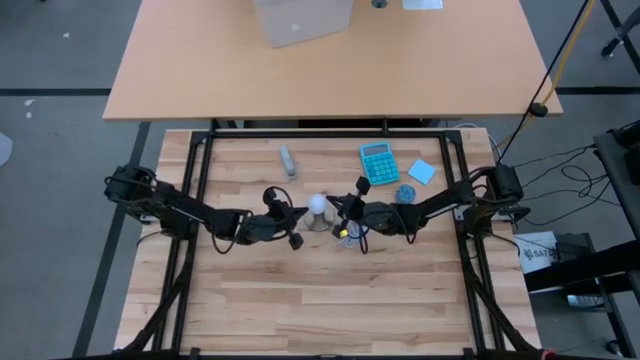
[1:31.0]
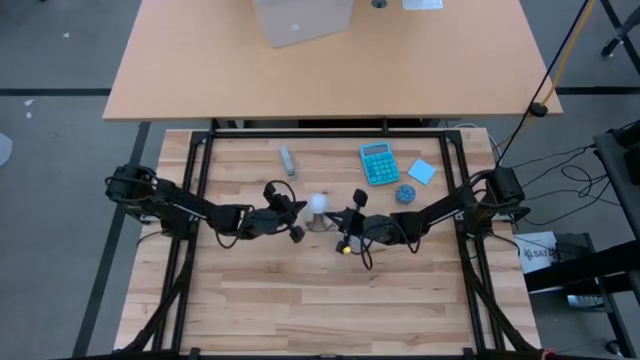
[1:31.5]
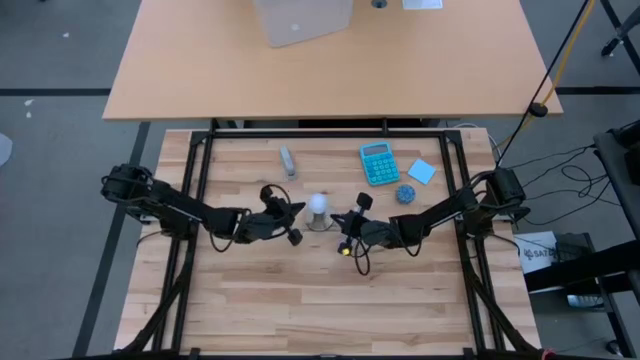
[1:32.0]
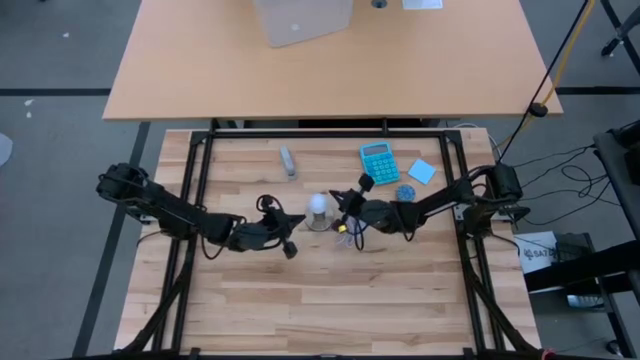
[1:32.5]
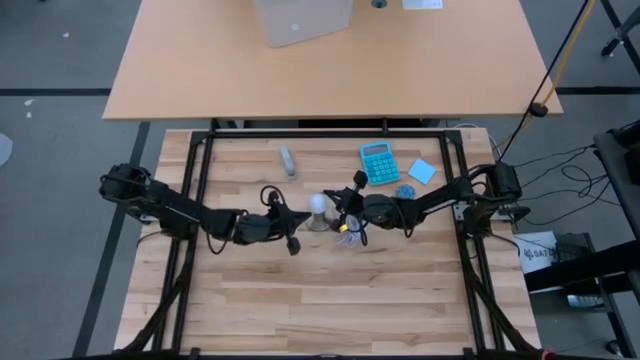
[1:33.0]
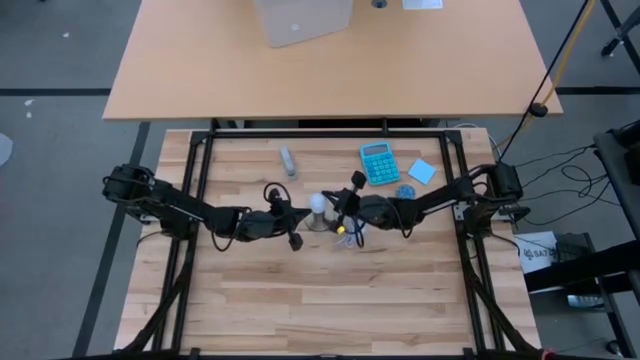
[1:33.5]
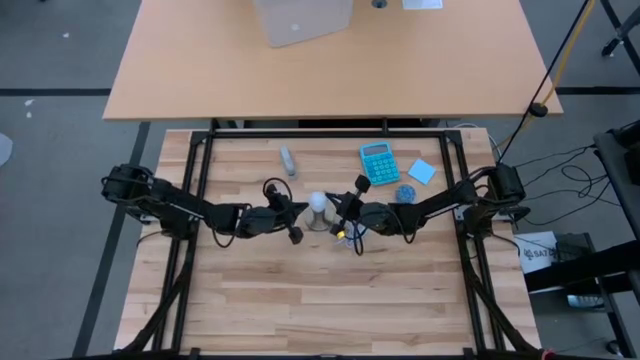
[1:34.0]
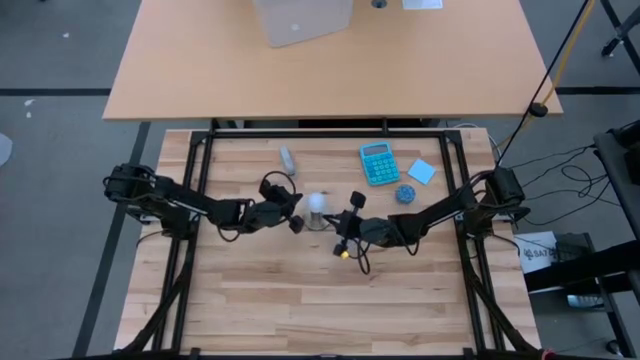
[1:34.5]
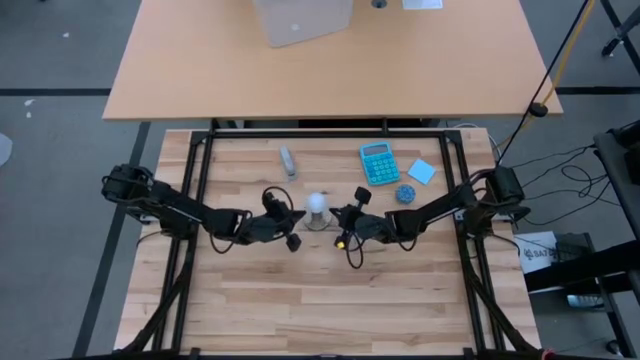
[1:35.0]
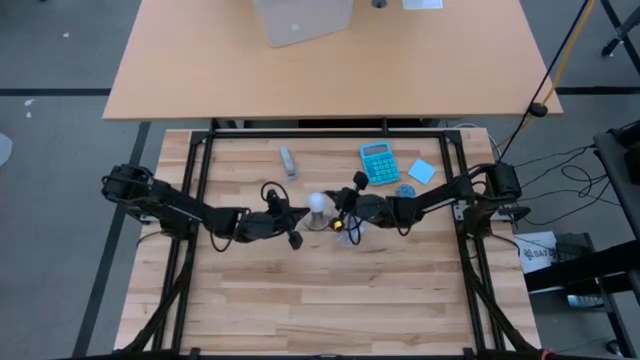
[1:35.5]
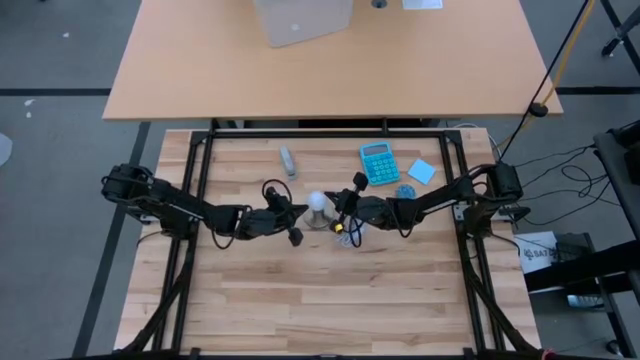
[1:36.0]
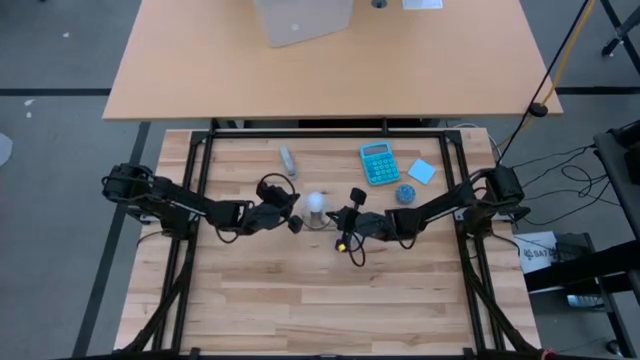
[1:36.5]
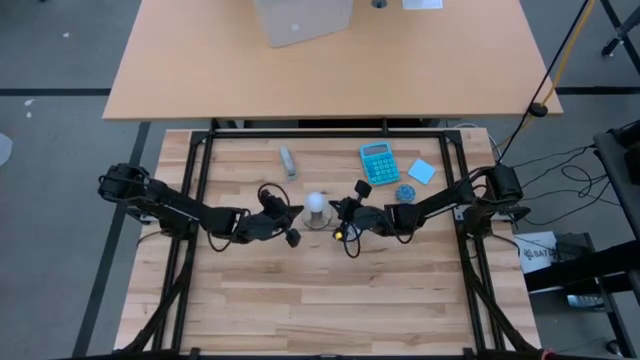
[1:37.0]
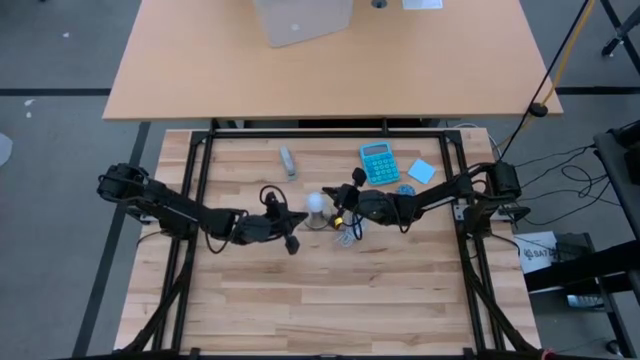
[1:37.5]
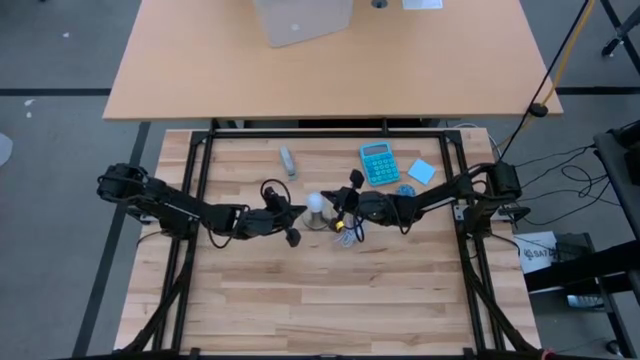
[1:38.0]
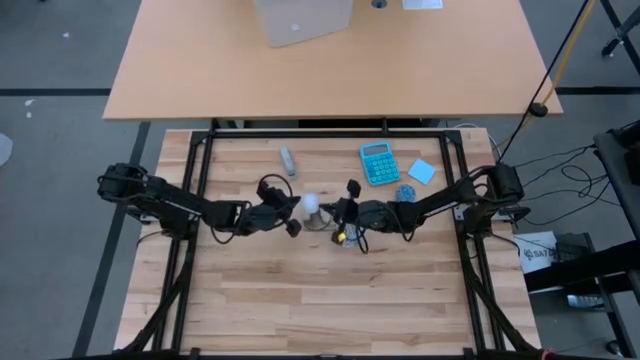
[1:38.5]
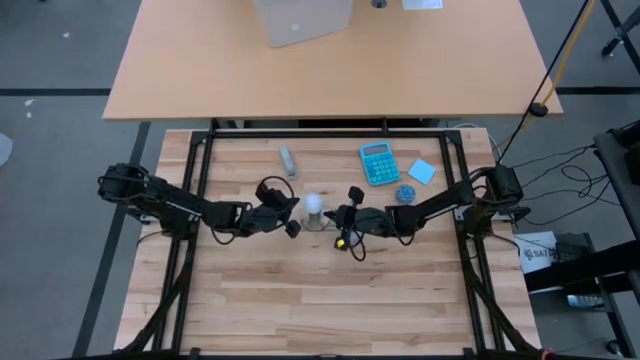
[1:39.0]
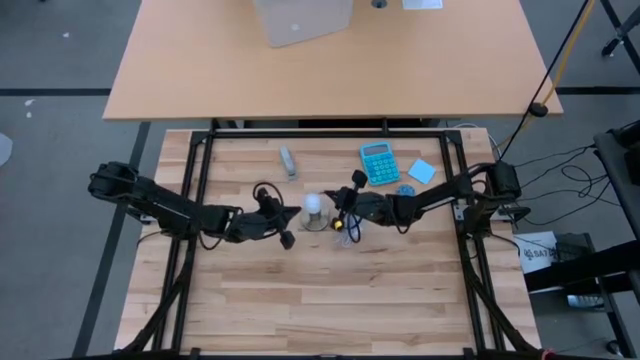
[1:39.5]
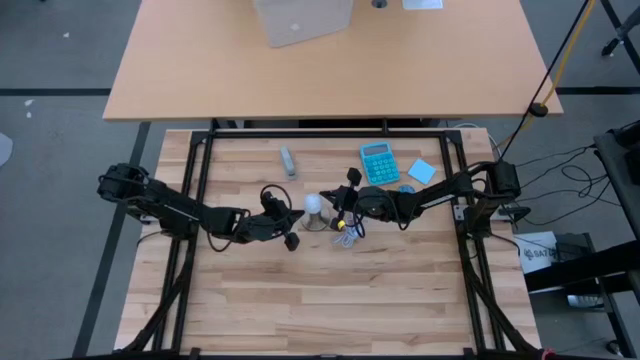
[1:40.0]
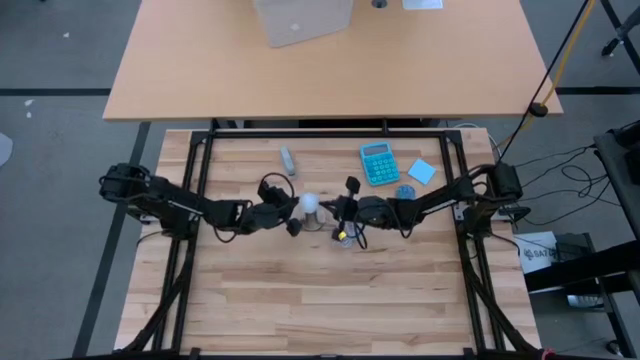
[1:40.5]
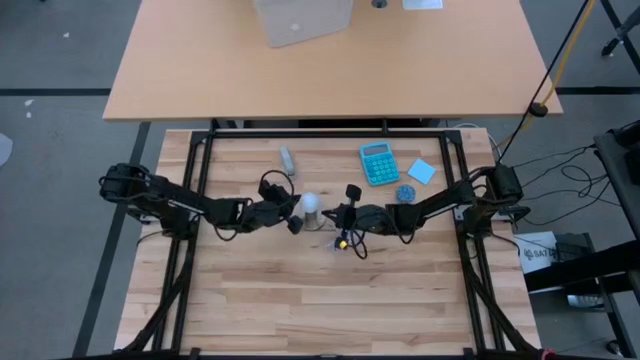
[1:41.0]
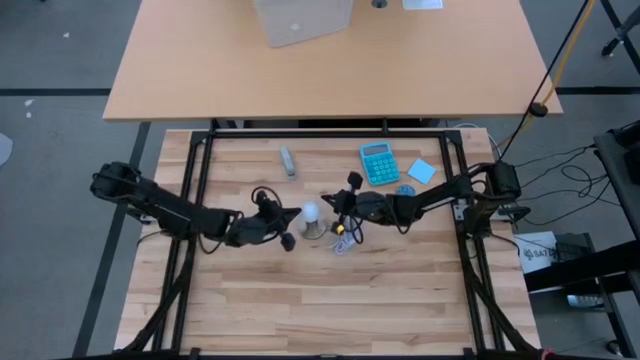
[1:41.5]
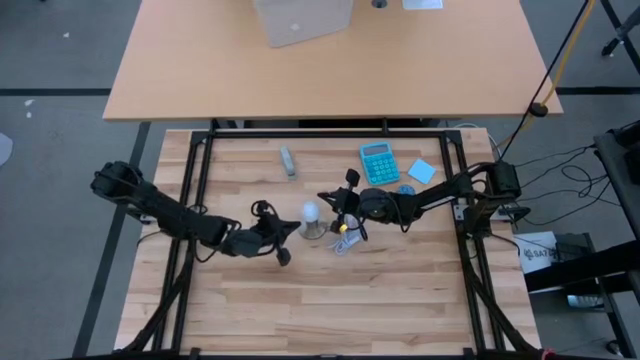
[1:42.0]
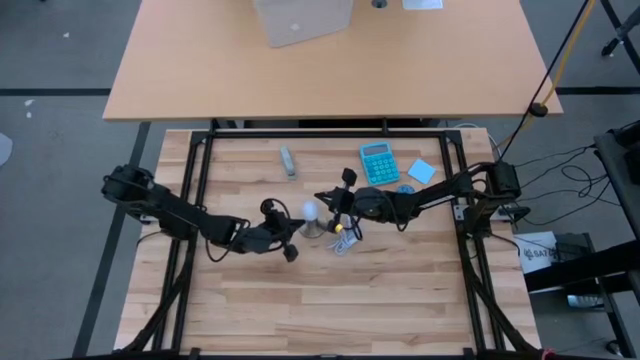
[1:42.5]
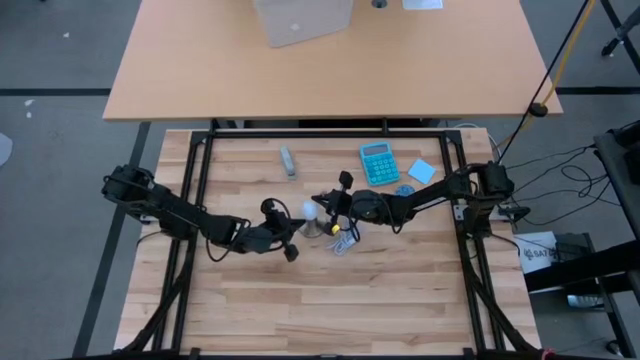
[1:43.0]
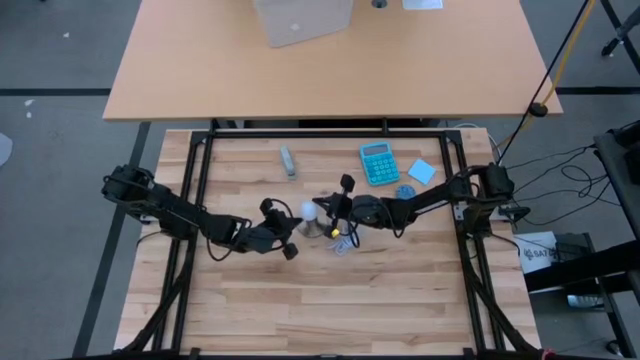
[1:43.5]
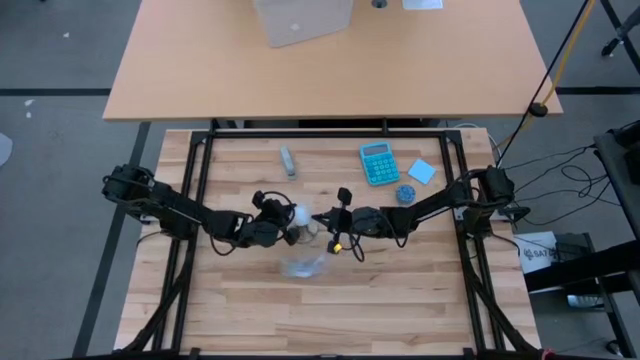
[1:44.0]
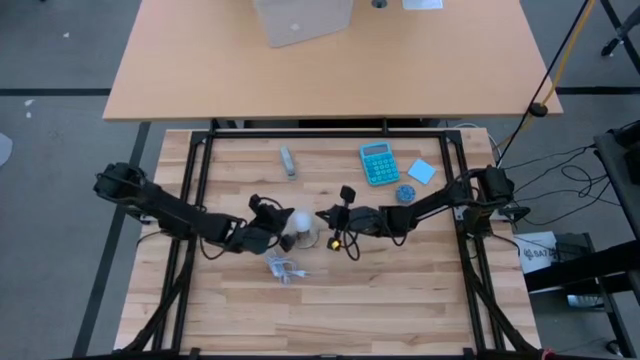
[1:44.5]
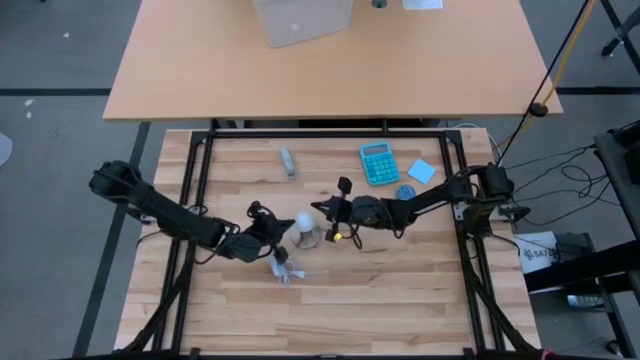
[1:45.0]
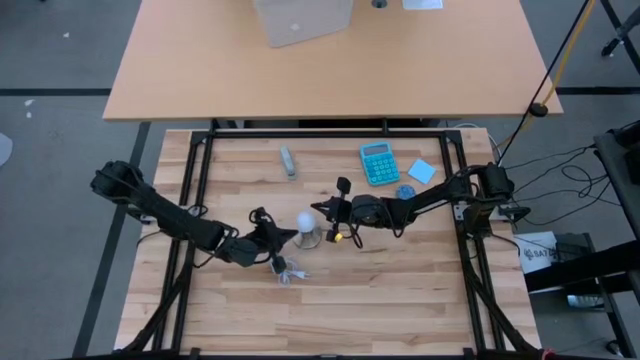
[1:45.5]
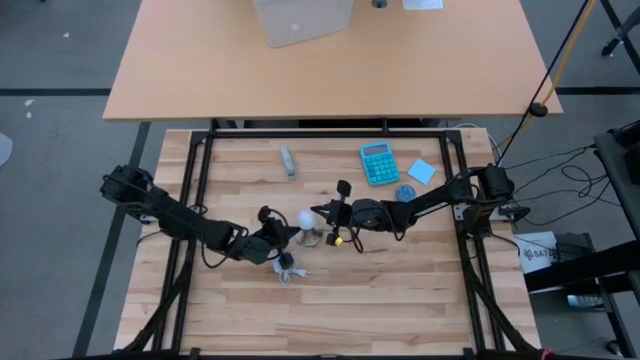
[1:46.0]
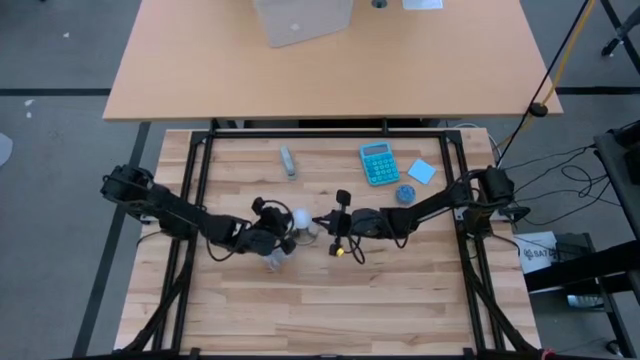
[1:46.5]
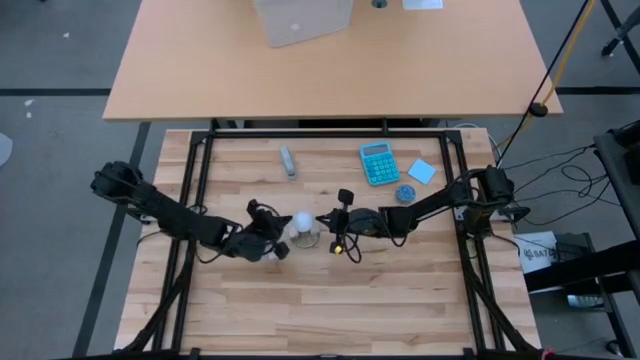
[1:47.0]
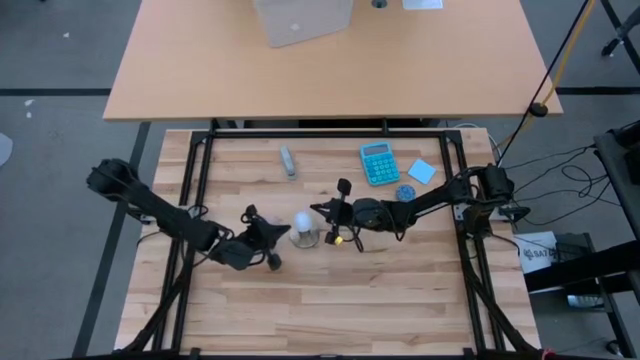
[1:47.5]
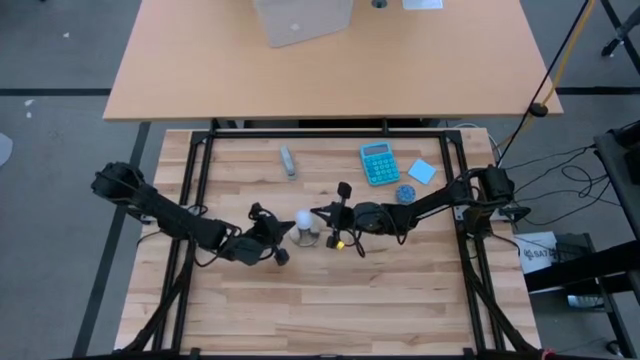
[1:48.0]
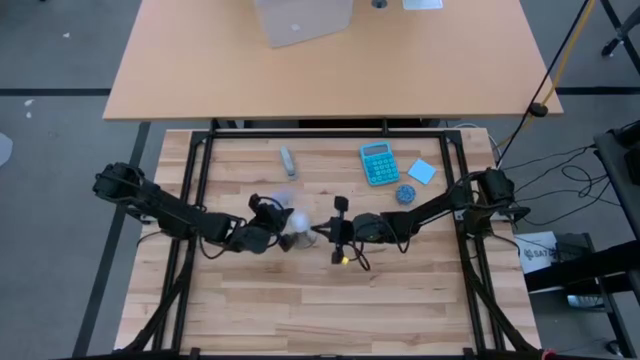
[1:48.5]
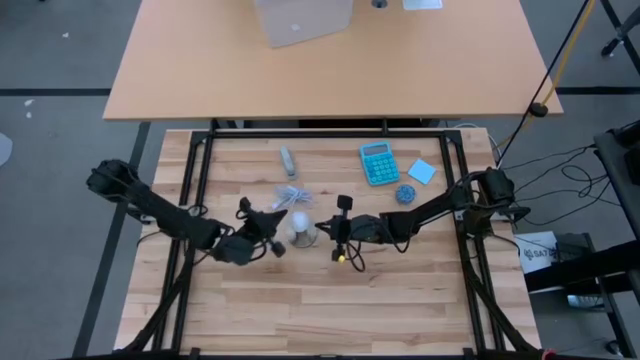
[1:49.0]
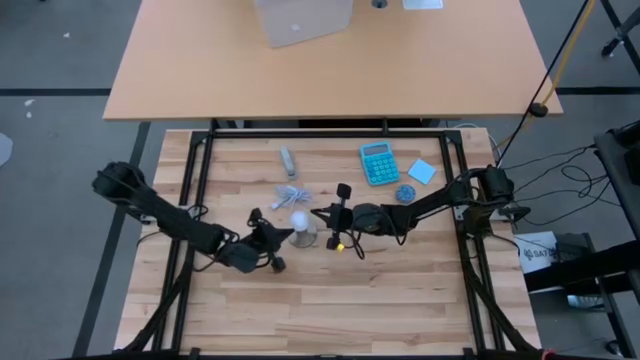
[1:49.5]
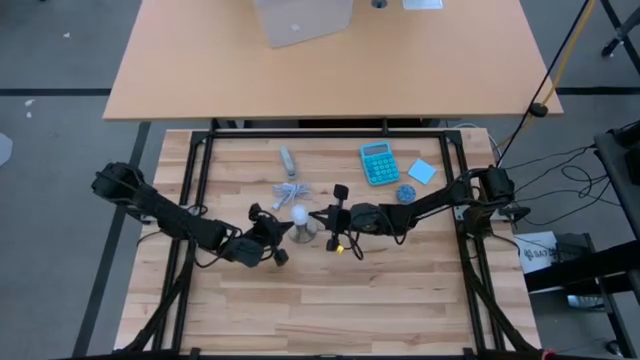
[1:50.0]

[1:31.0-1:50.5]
Task: Screw lightbulb
Insert the white lightbulb into the desk lamp
